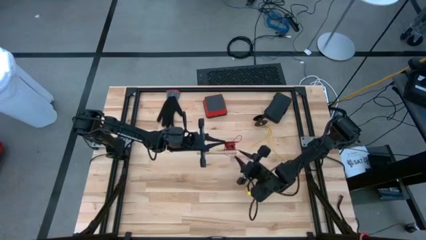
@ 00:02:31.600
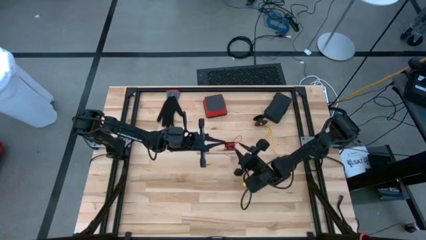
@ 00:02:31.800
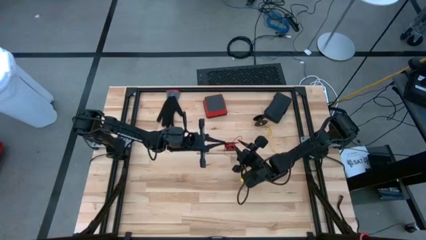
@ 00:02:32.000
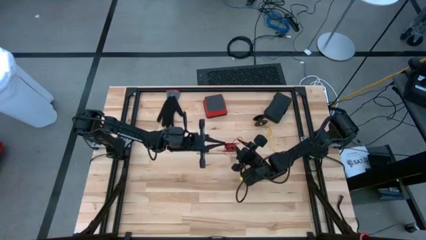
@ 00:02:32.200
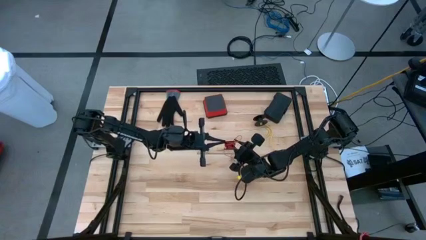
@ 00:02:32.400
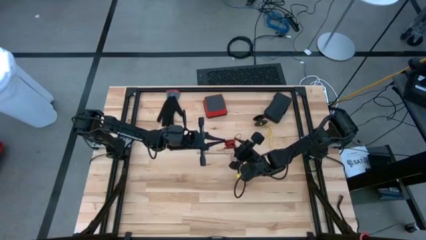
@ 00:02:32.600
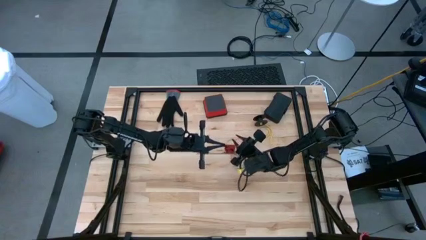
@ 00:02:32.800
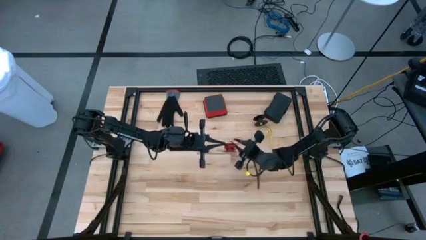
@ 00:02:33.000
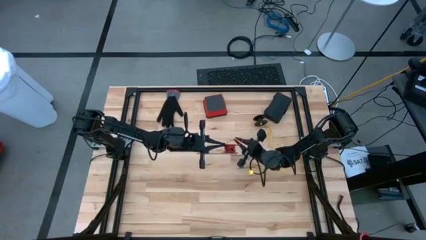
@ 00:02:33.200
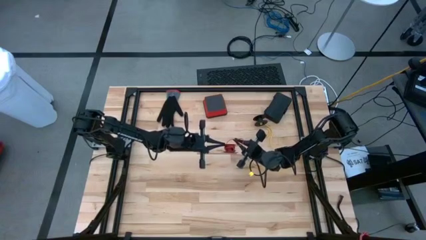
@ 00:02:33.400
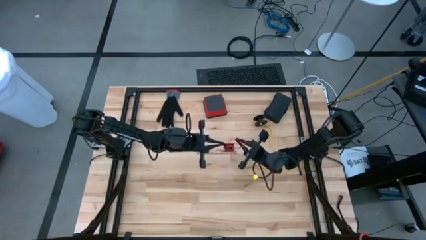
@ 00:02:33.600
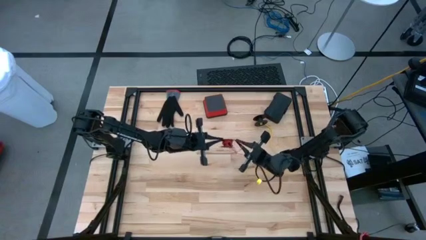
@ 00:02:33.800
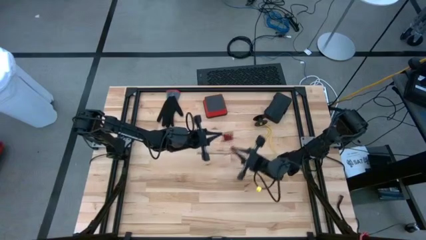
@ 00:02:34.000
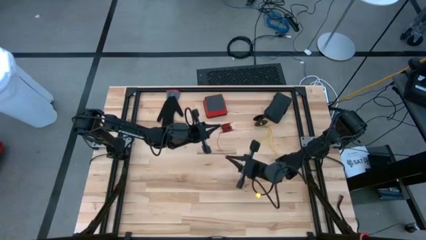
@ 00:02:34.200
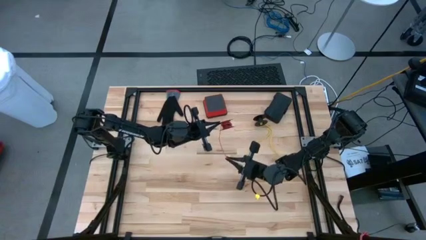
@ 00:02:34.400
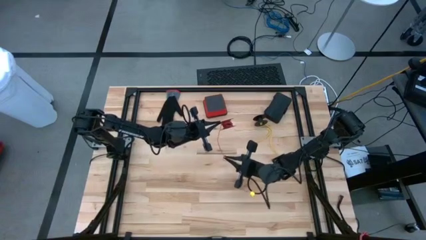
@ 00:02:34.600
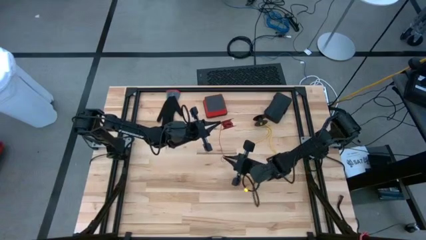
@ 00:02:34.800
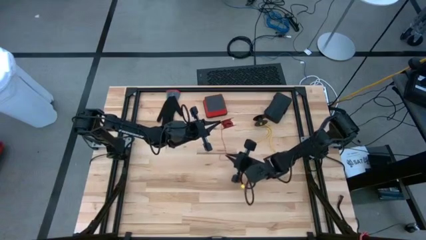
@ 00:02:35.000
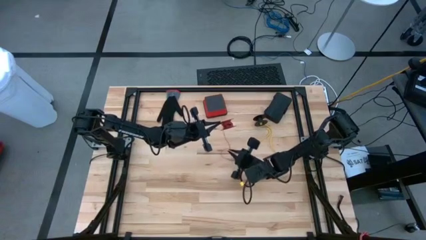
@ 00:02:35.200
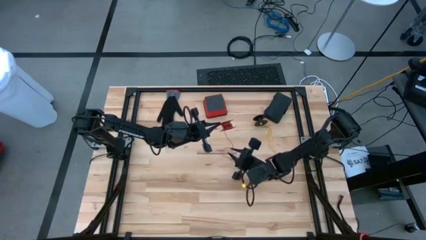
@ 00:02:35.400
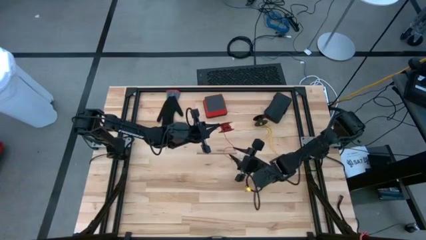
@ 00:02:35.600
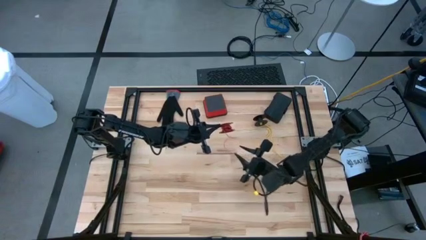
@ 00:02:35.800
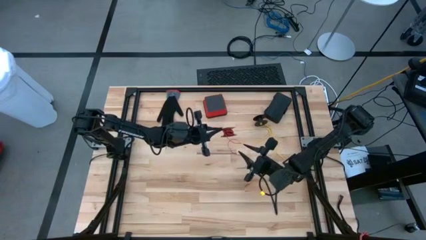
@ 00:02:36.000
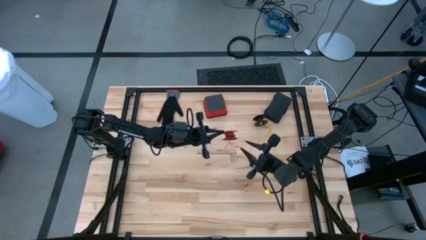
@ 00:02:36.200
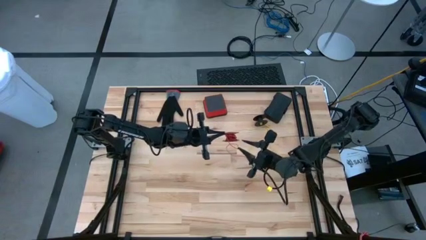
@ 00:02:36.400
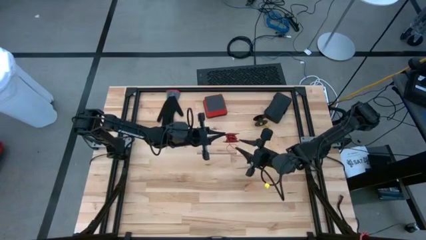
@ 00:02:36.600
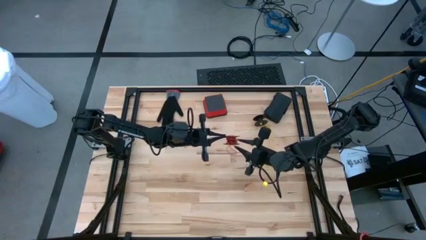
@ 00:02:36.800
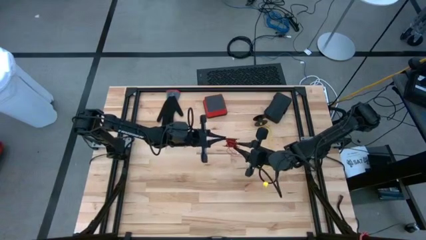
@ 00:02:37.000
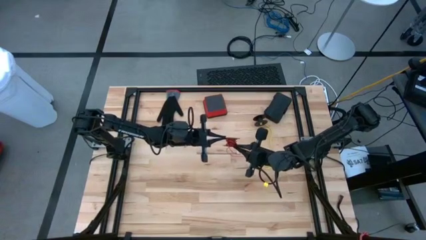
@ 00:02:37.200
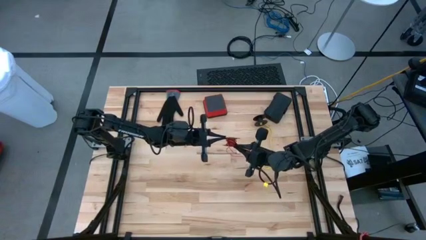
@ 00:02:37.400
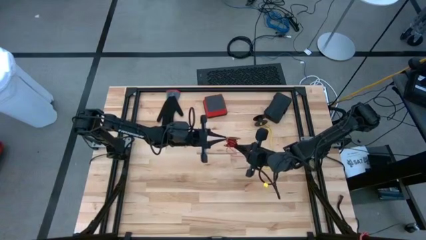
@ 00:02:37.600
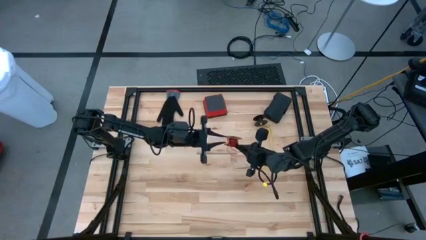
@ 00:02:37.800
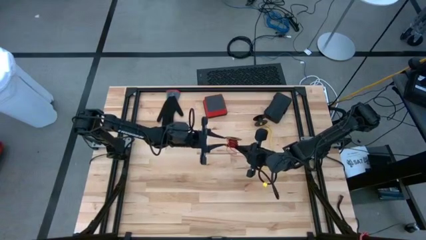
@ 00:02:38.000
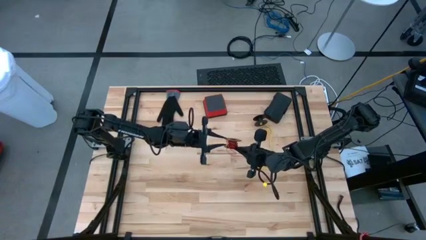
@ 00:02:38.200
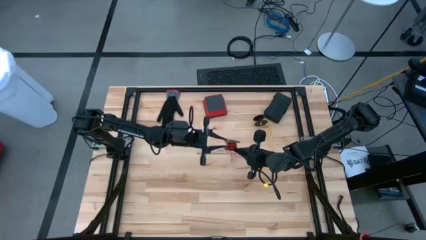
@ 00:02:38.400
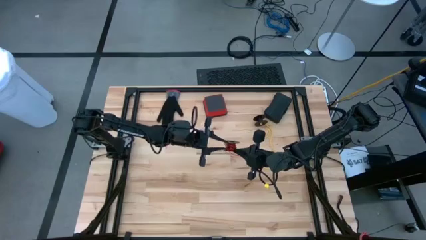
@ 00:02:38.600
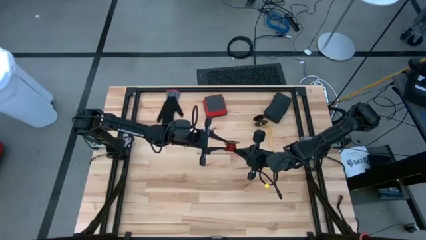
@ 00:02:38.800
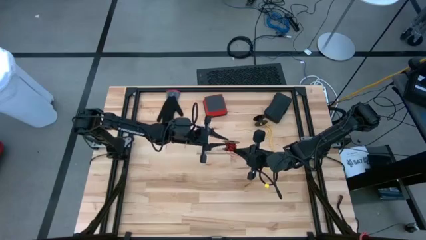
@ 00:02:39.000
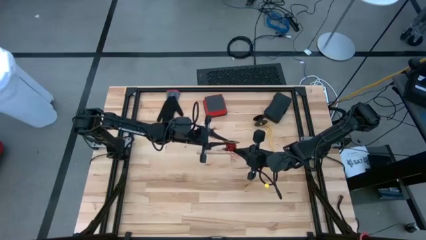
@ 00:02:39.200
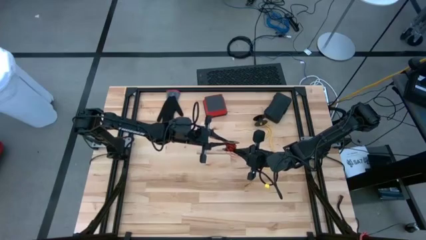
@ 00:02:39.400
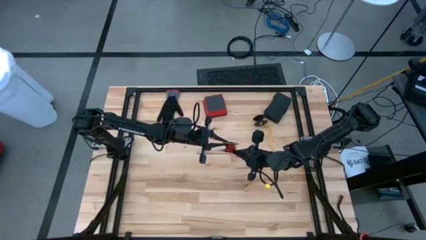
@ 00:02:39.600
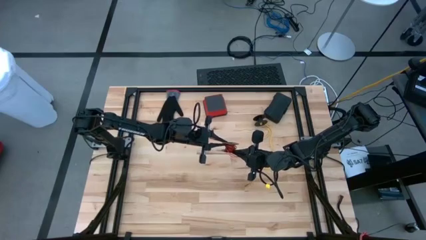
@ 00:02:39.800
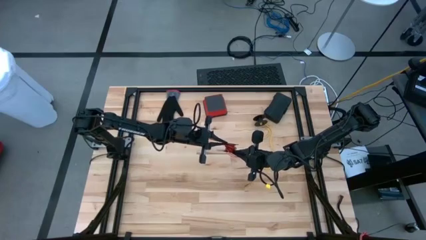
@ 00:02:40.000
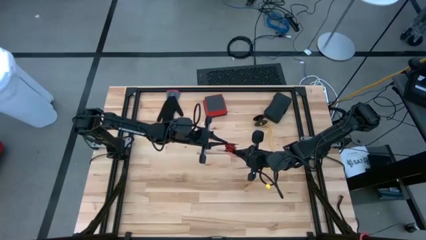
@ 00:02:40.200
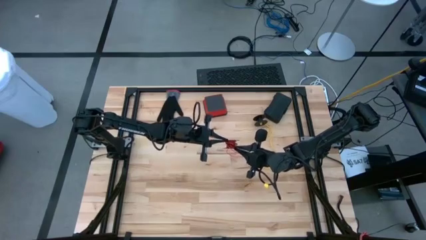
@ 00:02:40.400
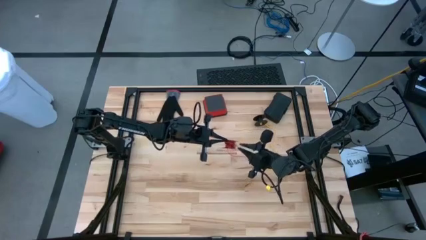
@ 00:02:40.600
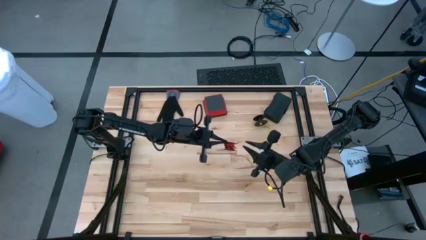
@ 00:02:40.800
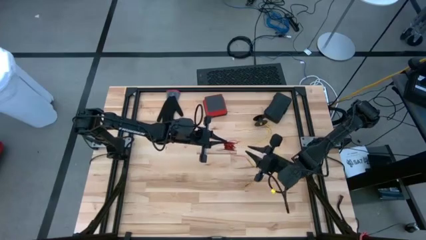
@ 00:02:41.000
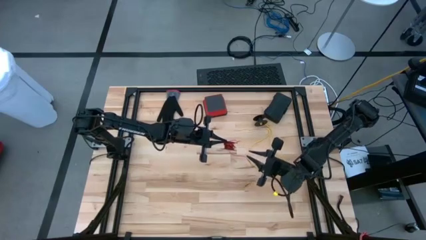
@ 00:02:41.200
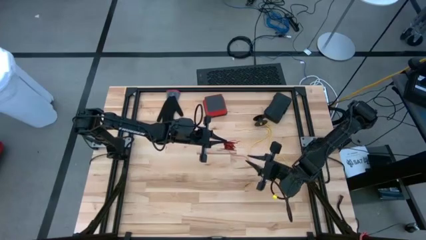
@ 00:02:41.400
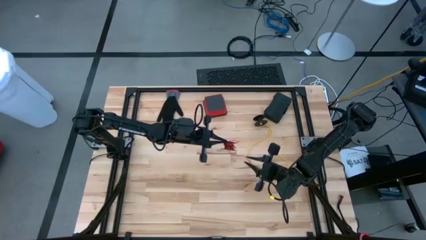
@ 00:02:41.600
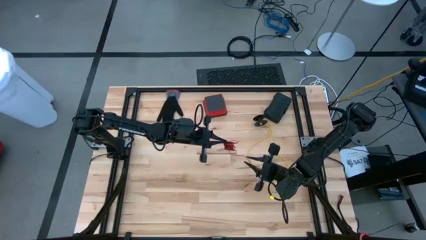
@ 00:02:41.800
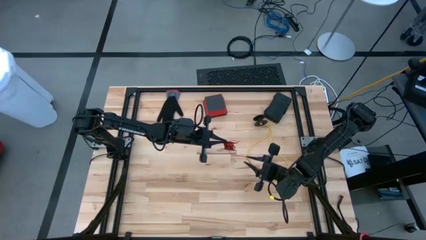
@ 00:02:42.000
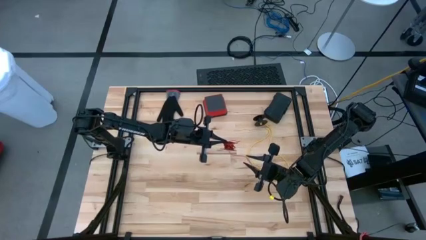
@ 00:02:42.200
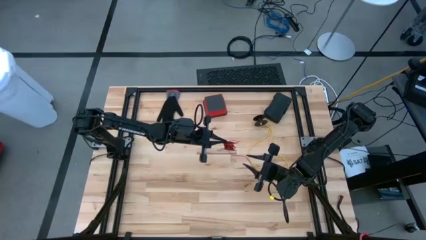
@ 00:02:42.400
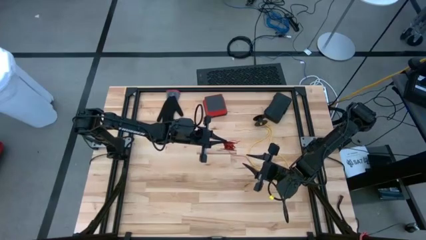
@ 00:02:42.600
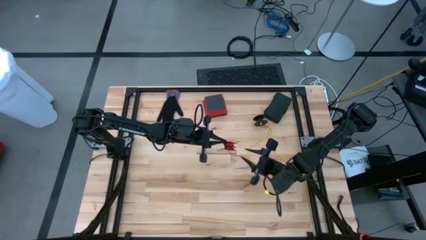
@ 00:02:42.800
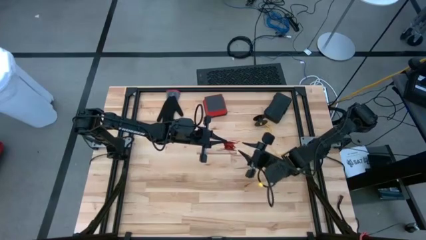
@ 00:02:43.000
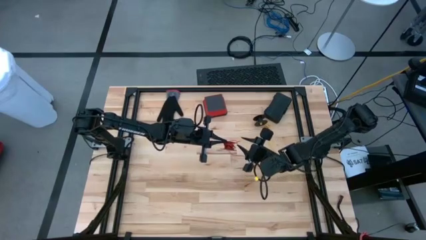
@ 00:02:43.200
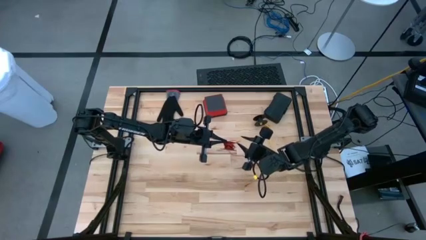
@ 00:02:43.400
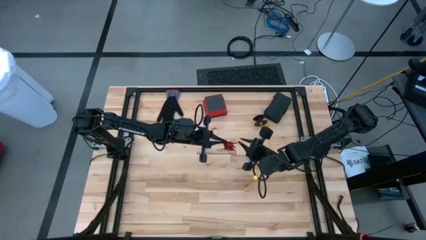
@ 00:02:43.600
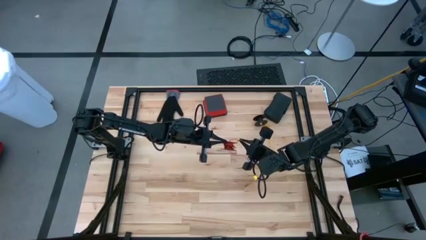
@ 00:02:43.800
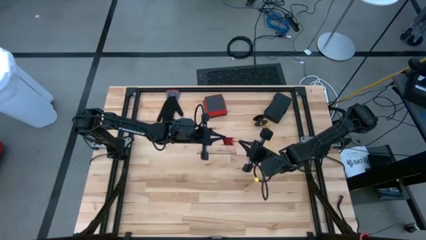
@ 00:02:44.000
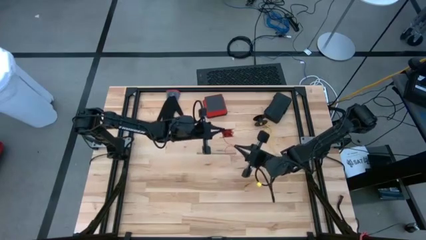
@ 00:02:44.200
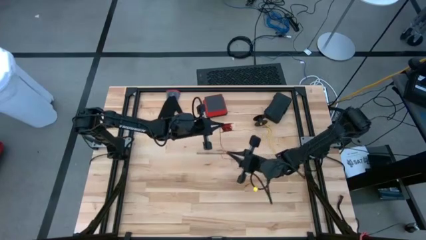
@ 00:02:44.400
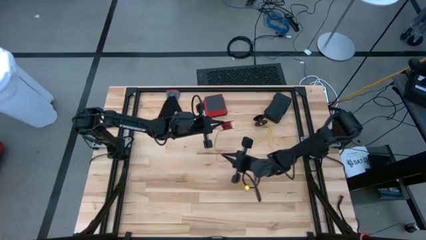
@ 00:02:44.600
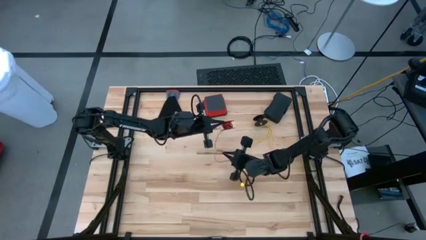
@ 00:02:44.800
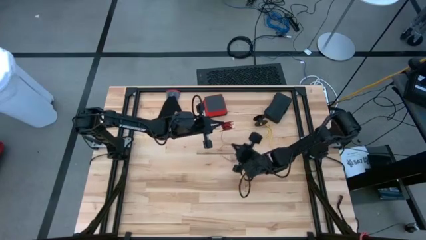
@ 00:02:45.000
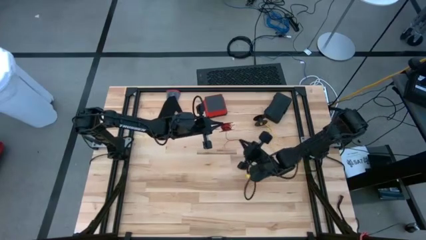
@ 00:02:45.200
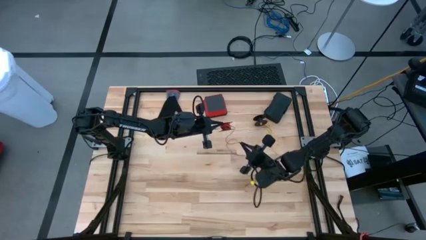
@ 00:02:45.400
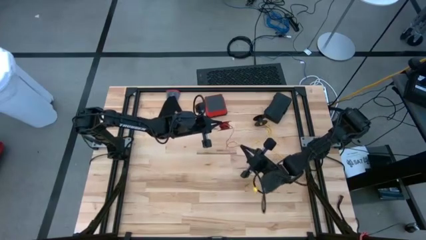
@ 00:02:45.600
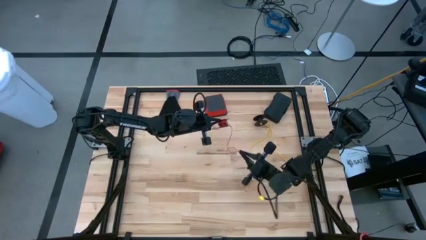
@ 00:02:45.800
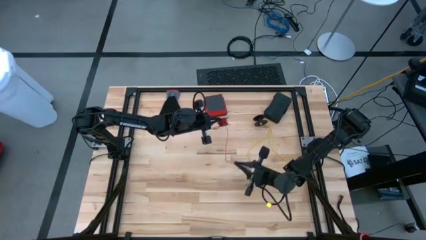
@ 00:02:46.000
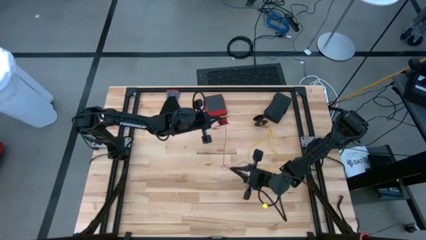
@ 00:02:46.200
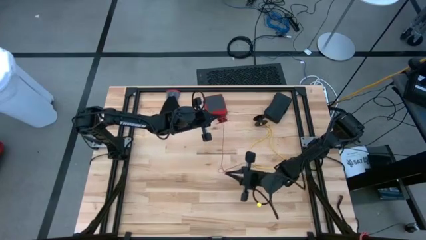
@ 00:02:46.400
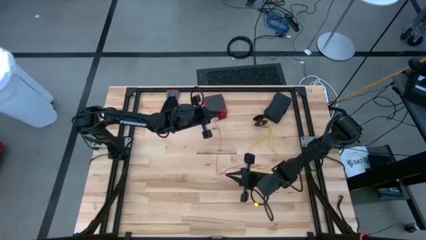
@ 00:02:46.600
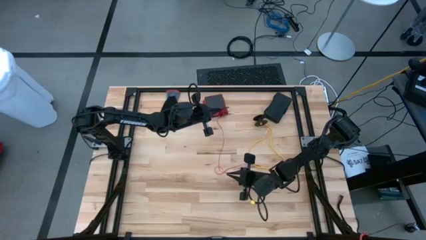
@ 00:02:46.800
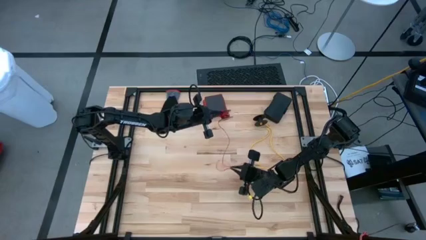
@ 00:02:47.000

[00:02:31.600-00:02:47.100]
Task: Coil cords
Uncoil the red wire from the spool

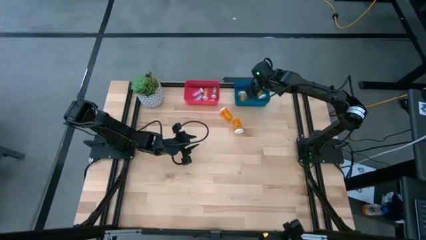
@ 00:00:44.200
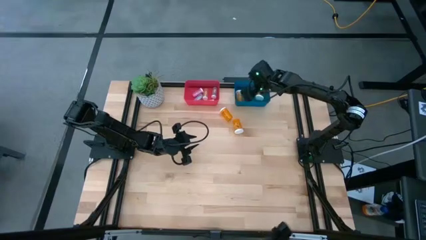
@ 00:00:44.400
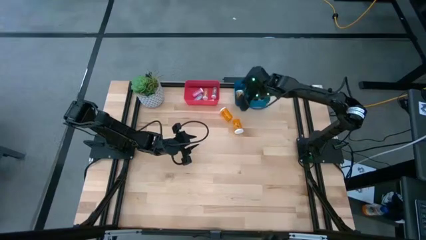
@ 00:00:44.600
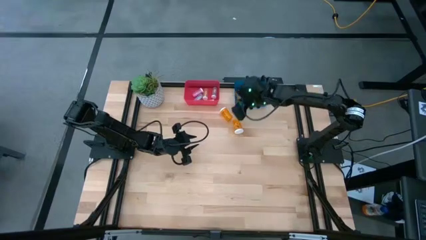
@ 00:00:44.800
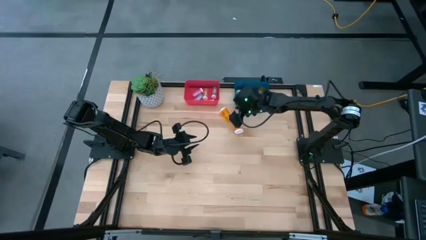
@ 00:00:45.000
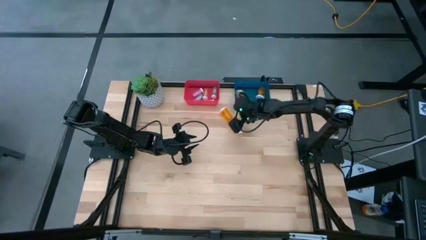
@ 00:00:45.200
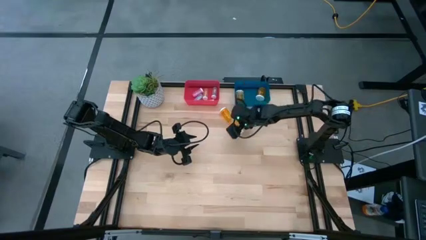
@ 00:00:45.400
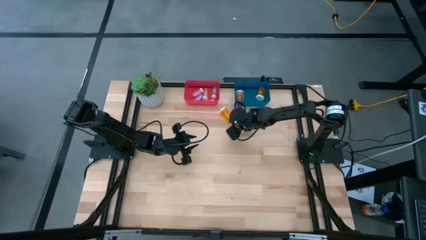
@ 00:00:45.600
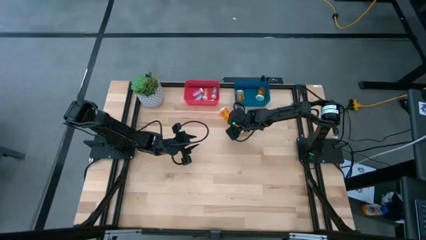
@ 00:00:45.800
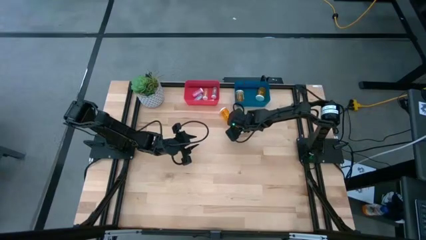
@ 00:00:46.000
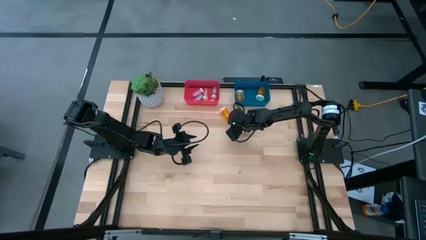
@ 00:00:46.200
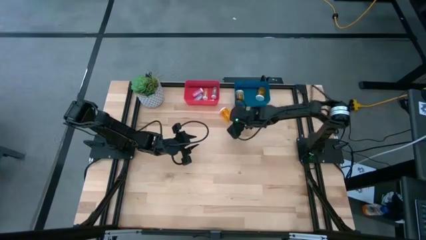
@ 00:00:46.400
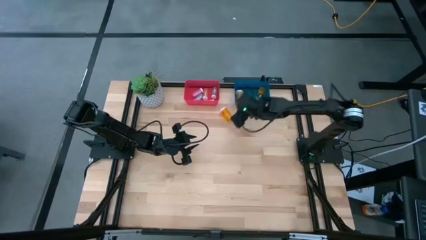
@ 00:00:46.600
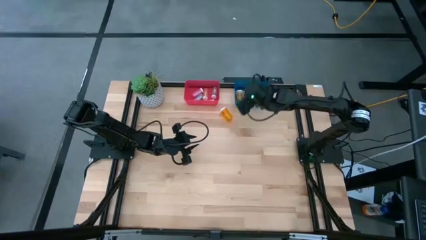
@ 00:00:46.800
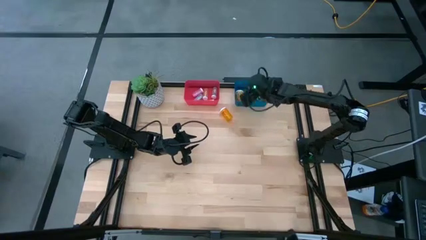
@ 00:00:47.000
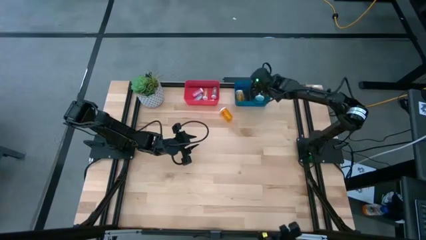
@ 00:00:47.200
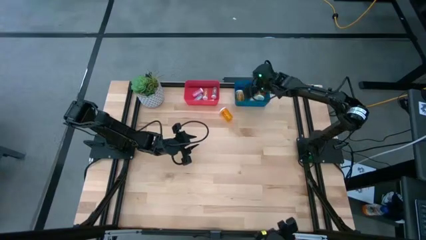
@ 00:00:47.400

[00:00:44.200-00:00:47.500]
Task: Pick and place medicine bottles into bin by pill shape (circle, oval)
Put the orange pill bottle into the blue bin
